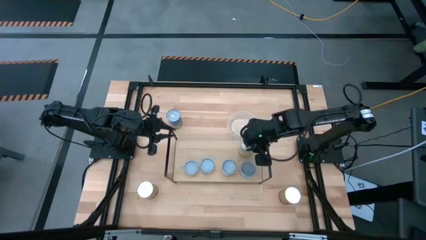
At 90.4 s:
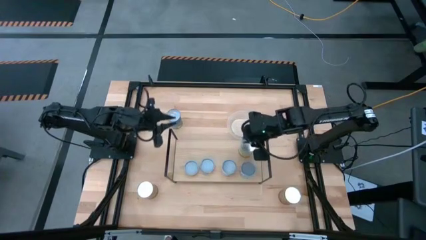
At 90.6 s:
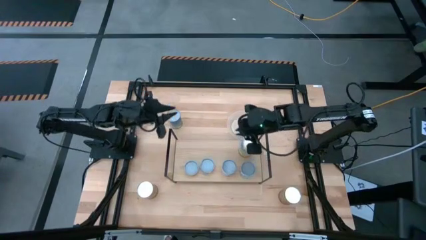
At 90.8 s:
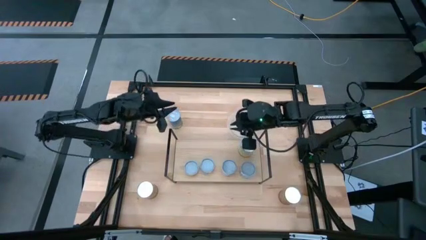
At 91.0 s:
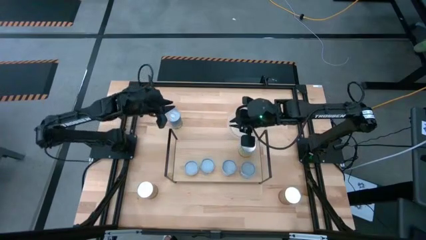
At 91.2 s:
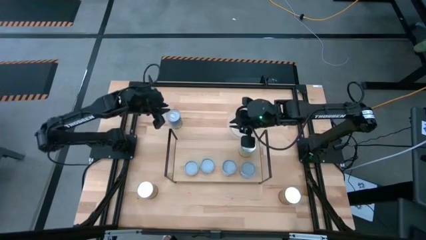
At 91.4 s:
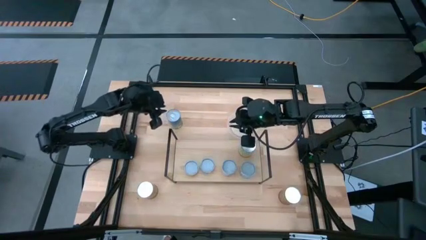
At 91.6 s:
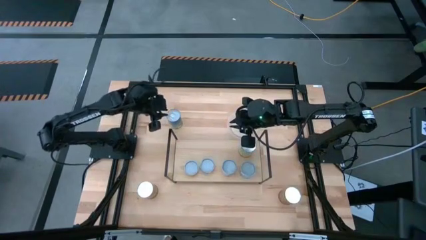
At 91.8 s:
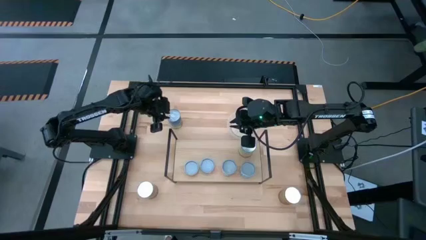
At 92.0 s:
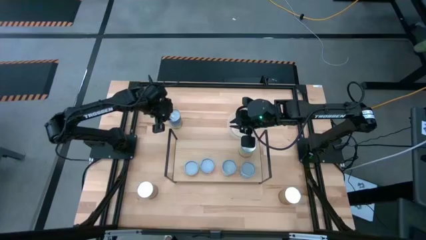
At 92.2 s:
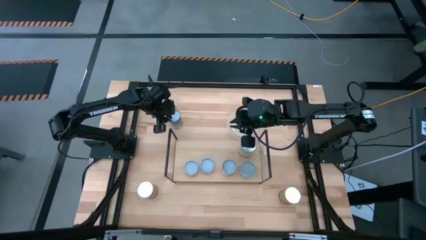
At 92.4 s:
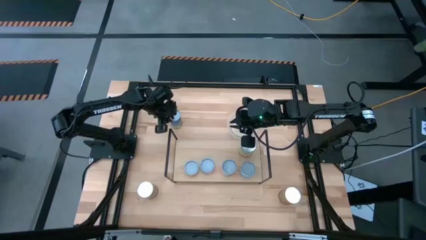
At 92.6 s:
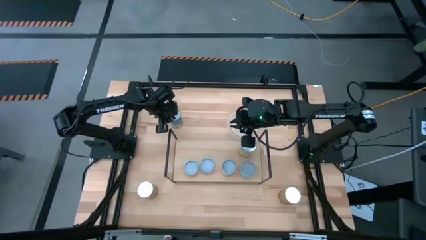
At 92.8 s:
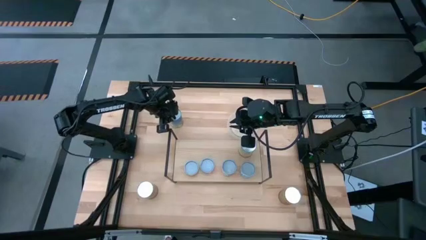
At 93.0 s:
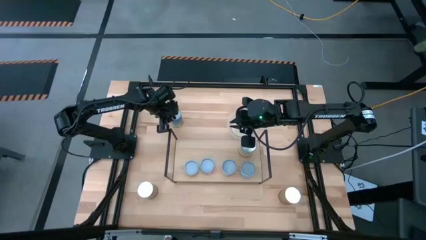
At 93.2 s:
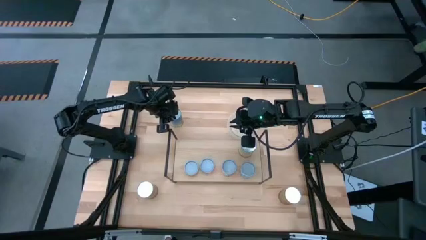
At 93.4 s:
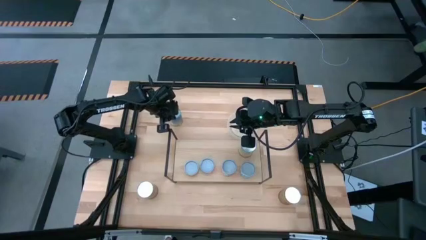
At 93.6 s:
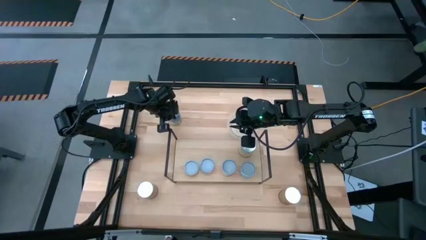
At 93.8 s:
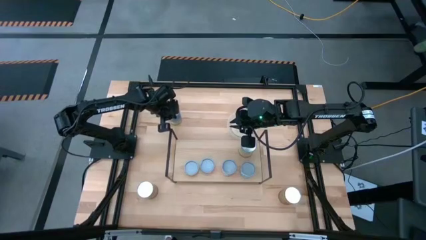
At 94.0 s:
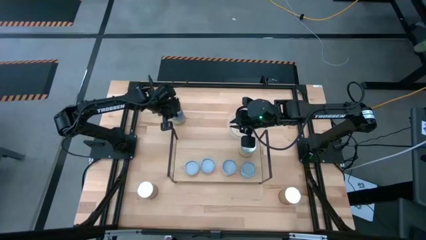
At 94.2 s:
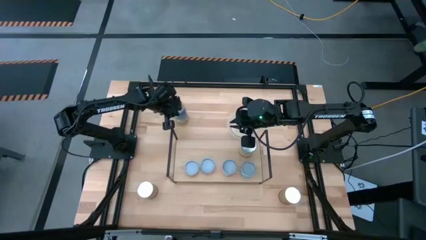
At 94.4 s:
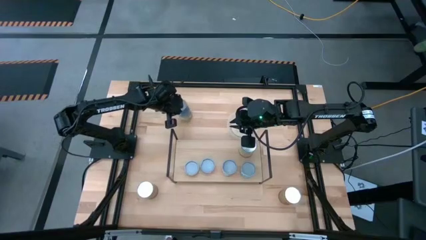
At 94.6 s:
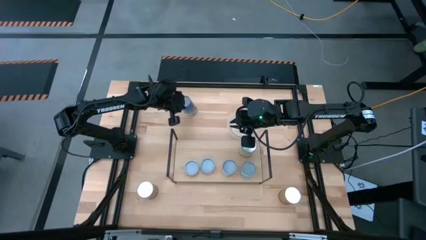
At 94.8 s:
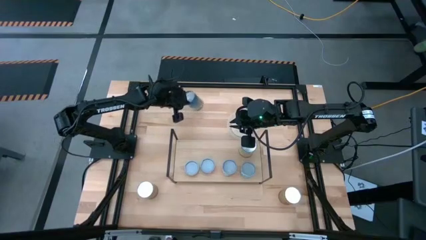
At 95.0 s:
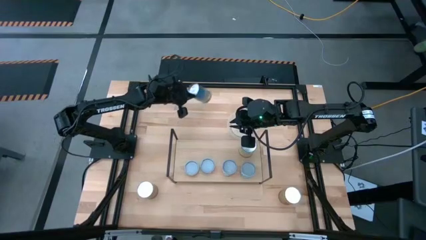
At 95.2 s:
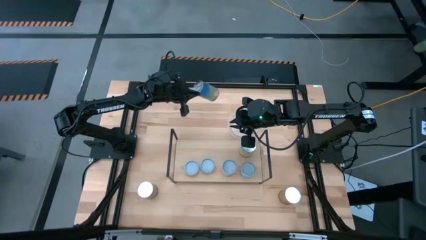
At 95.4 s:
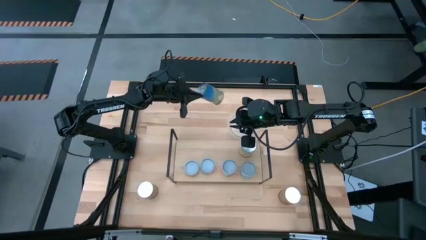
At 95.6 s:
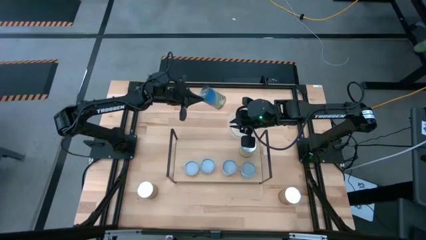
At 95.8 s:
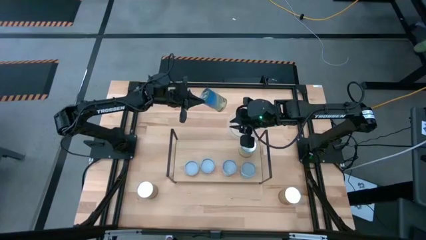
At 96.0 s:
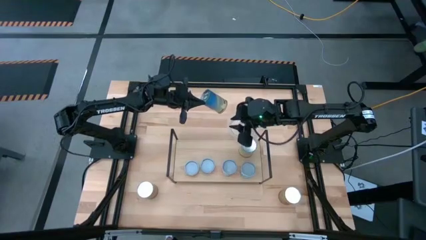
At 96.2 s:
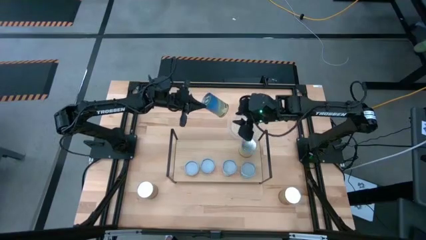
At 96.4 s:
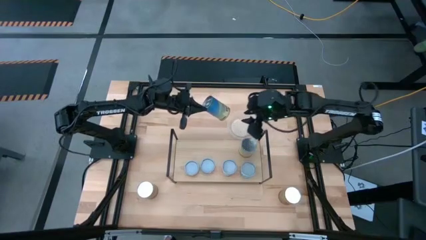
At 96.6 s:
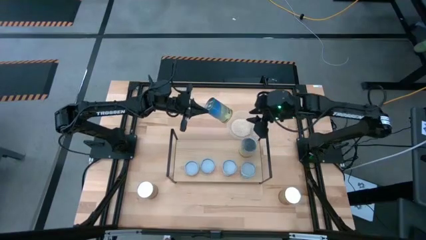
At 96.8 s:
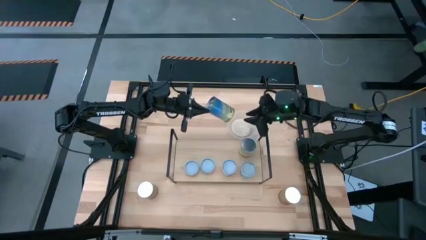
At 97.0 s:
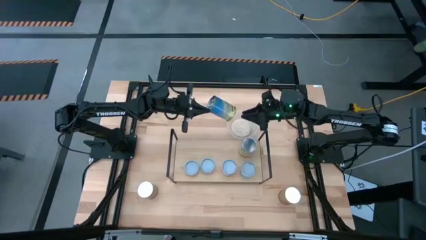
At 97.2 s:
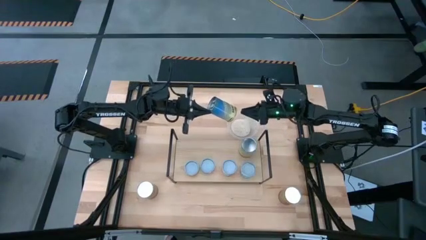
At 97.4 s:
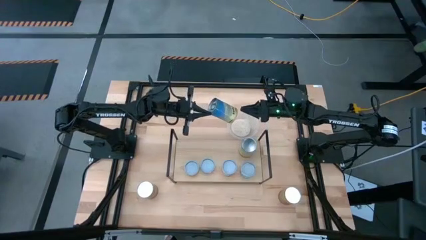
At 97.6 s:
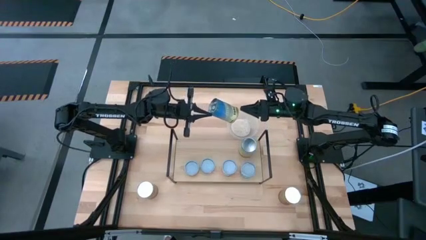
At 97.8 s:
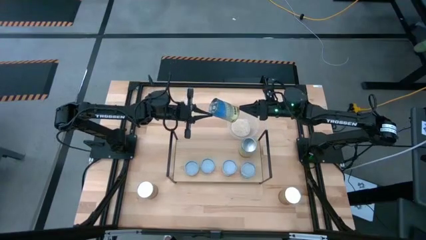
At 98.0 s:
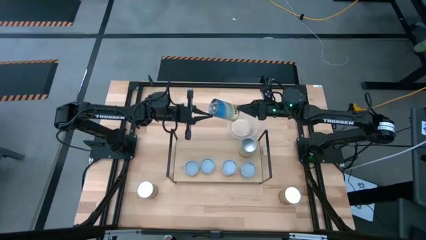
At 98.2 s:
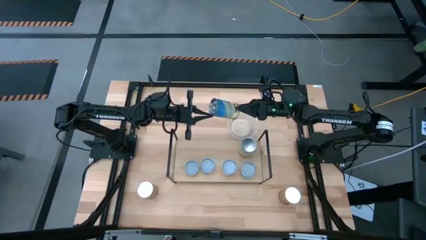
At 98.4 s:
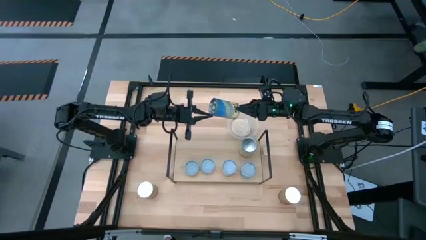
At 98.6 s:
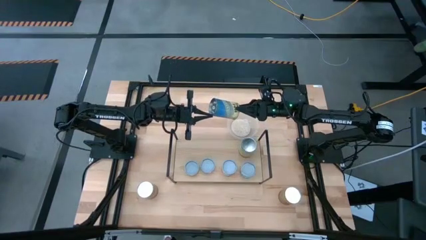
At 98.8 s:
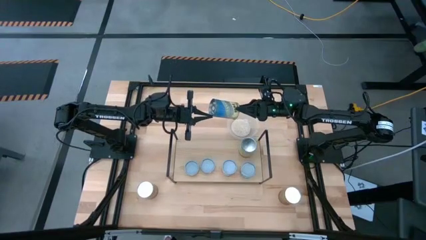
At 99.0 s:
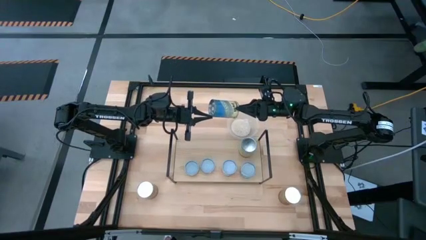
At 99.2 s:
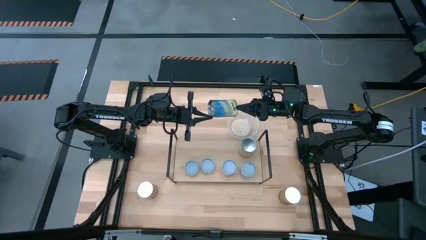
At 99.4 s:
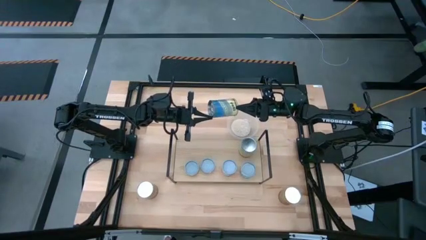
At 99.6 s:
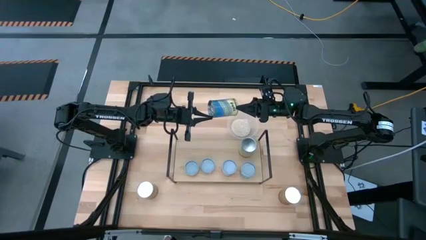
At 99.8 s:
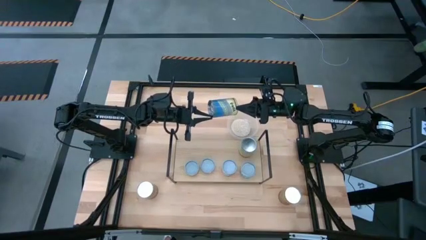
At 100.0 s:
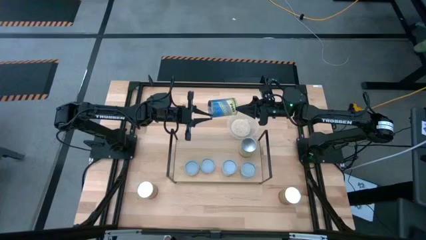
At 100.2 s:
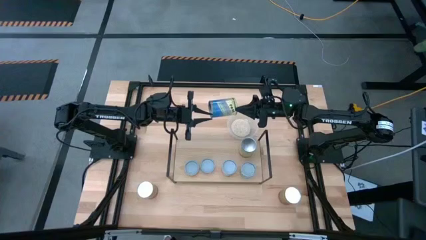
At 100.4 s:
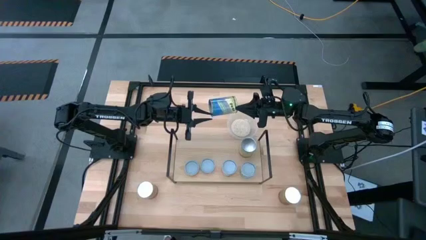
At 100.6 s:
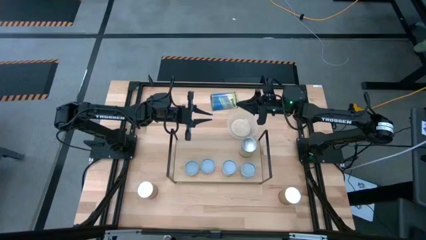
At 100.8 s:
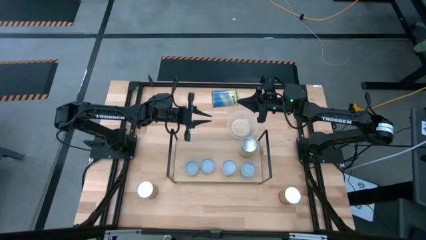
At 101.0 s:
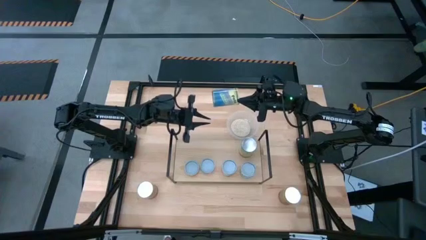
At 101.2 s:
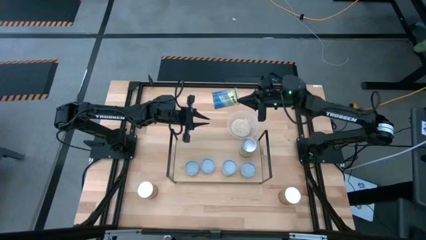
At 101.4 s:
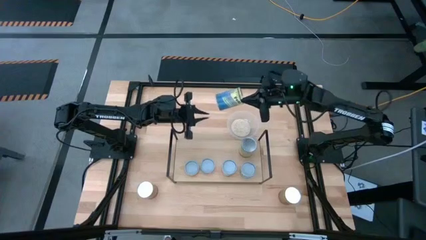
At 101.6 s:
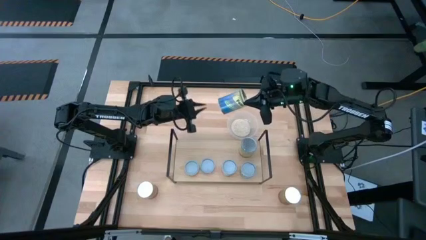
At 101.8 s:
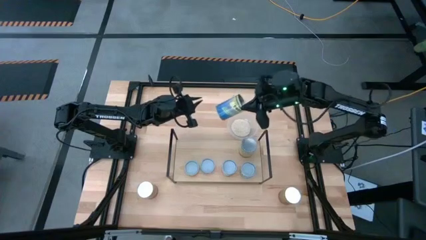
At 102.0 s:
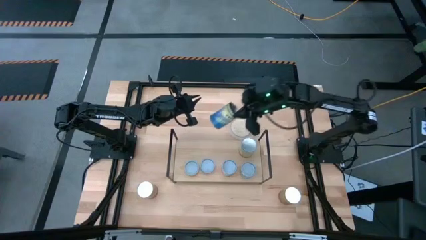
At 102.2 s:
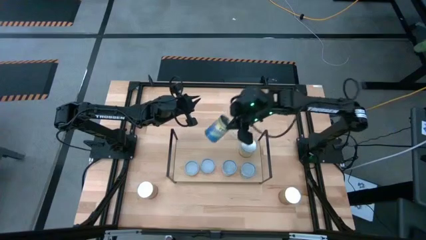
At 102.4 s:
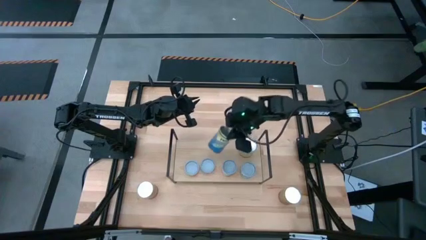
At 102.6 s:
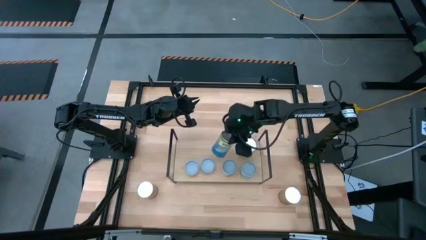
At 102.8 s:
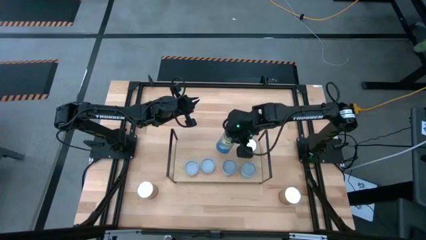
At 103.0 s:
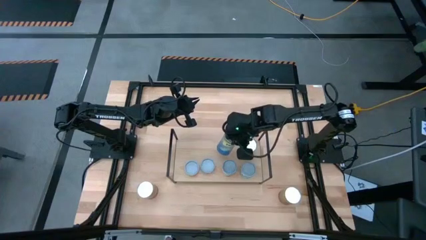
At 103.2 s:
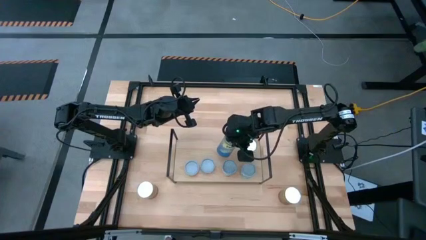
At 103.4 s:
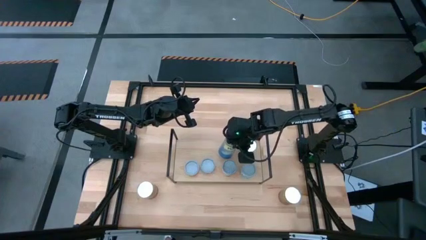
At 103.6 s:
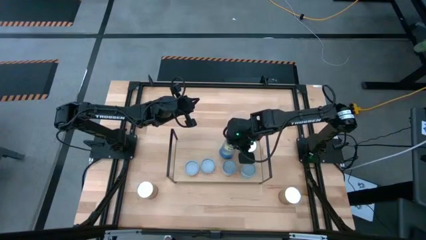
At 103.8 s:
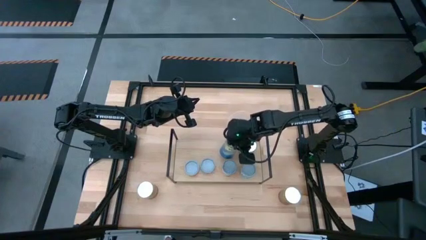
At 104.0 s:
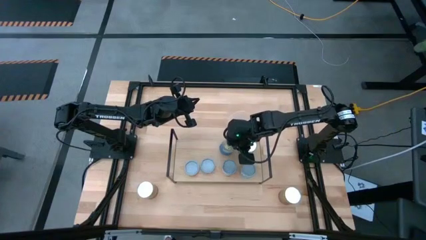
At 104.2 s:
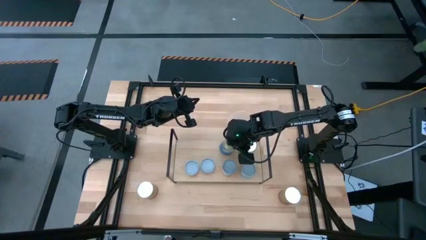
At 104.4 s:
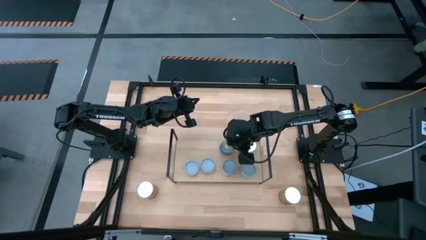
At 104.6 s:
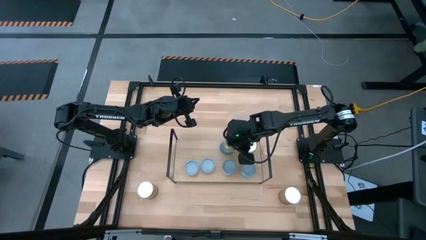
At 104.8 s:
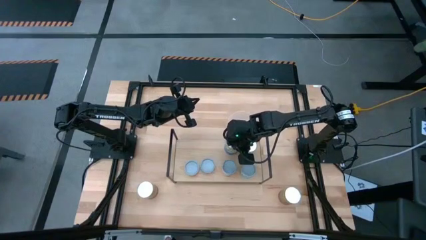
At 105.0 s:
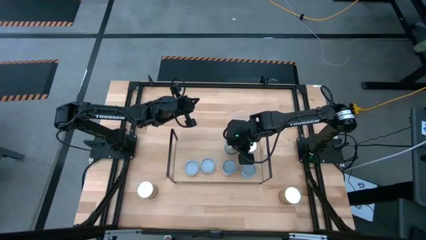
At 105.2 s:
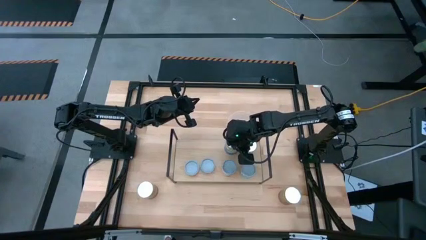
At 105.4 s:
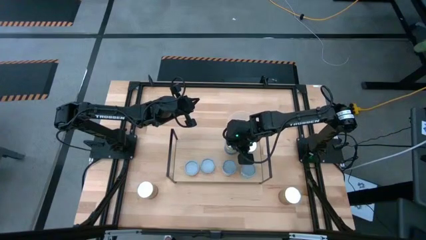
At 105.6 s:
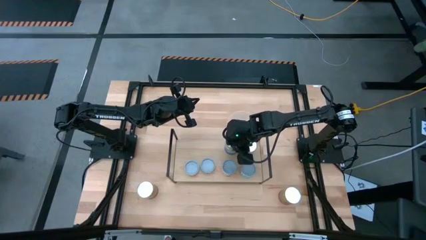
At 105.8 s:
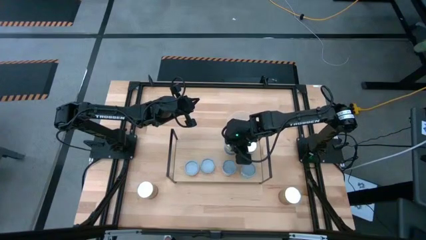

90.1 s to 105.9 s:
Task: Pick and place cans onto a shelf
Put the canned peas on the shelf
